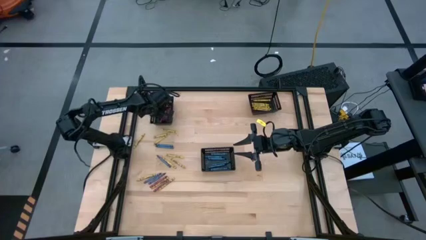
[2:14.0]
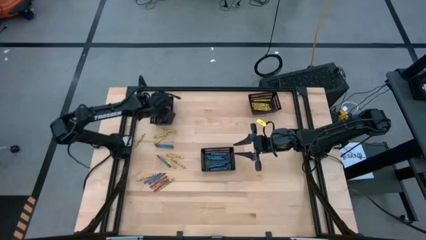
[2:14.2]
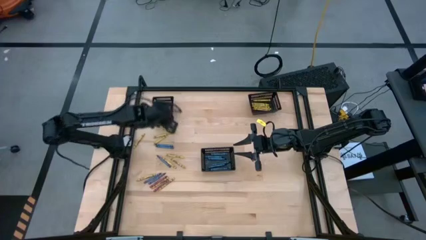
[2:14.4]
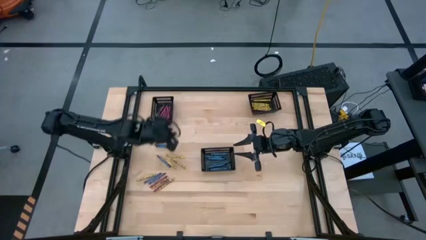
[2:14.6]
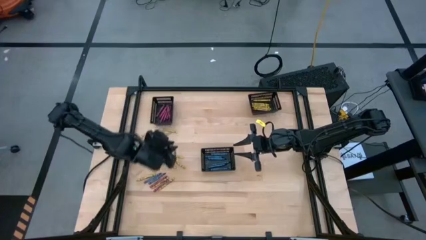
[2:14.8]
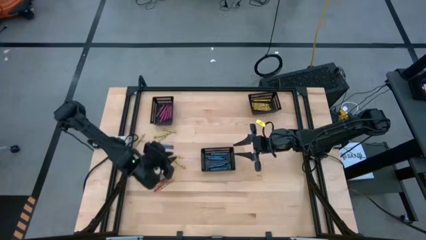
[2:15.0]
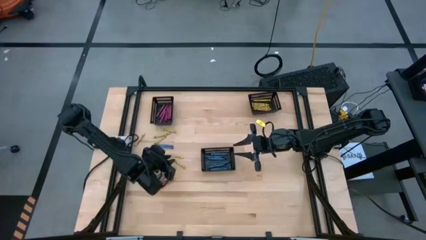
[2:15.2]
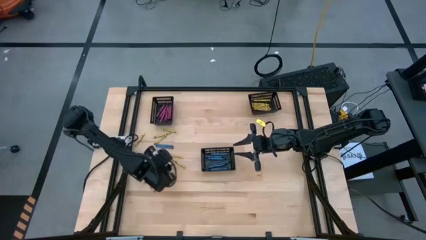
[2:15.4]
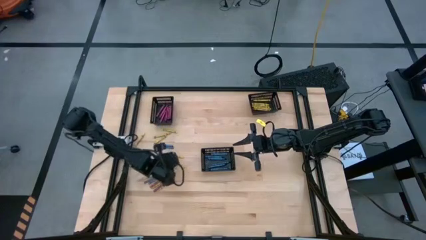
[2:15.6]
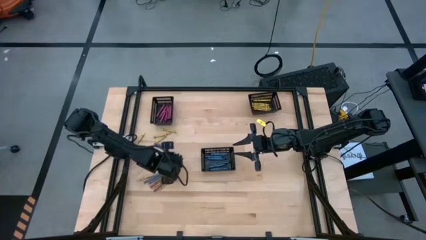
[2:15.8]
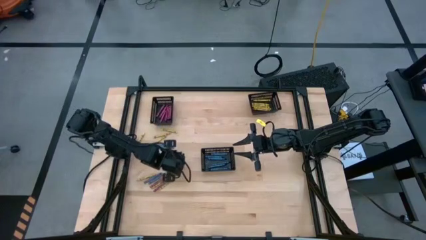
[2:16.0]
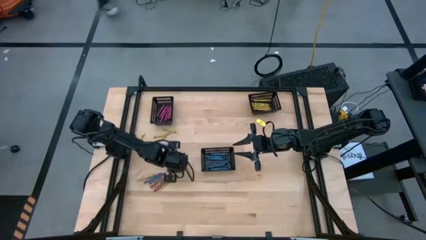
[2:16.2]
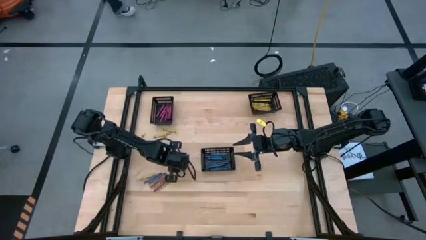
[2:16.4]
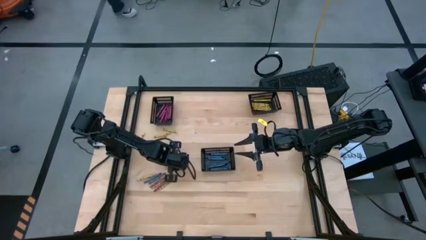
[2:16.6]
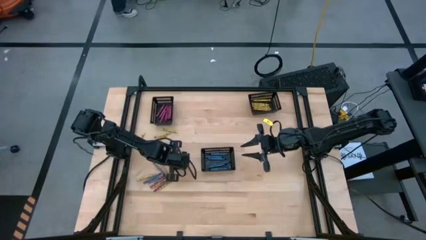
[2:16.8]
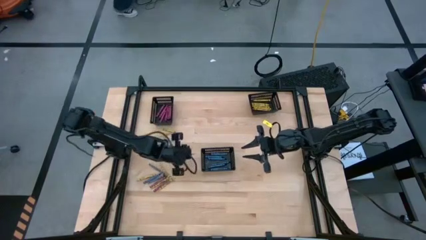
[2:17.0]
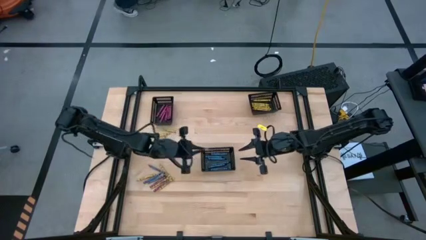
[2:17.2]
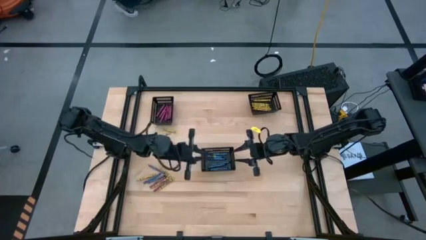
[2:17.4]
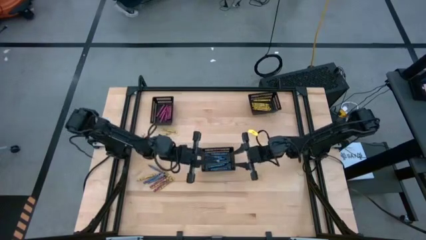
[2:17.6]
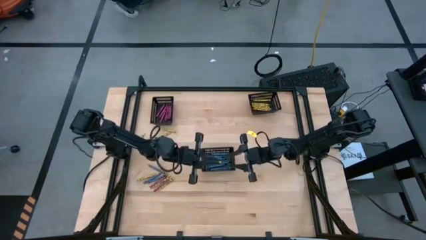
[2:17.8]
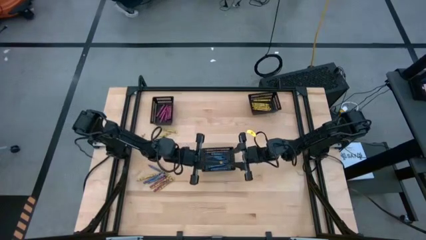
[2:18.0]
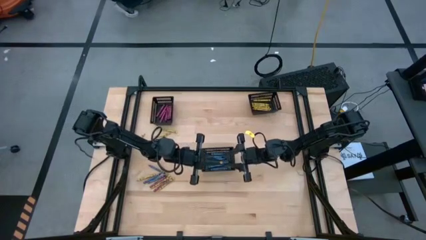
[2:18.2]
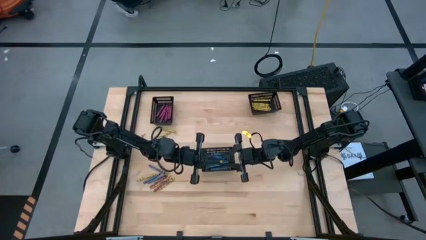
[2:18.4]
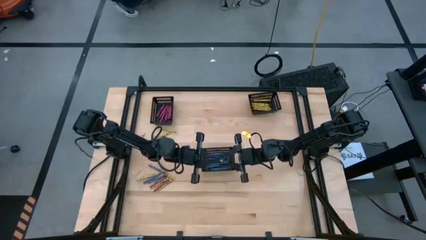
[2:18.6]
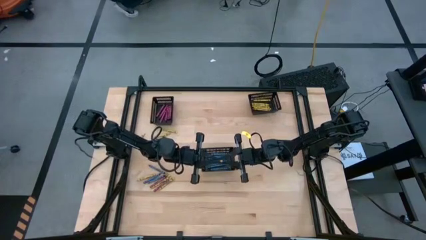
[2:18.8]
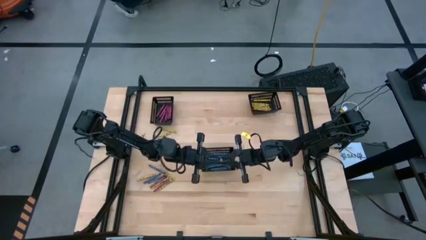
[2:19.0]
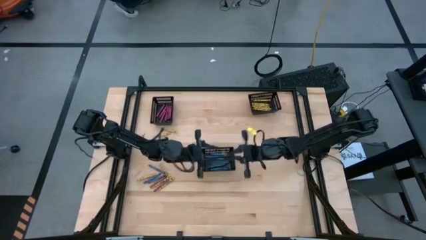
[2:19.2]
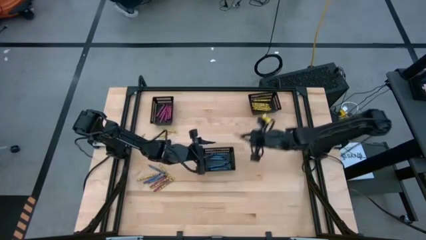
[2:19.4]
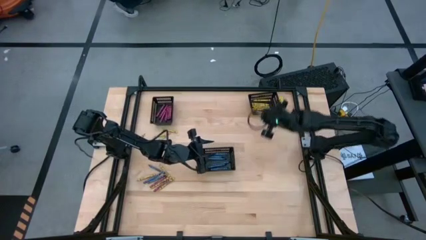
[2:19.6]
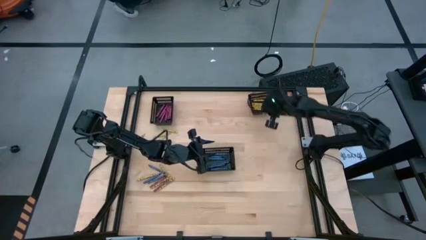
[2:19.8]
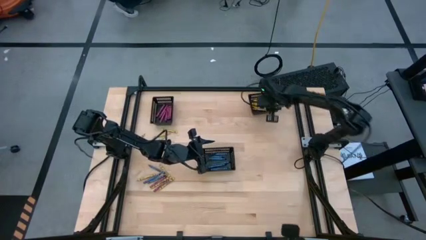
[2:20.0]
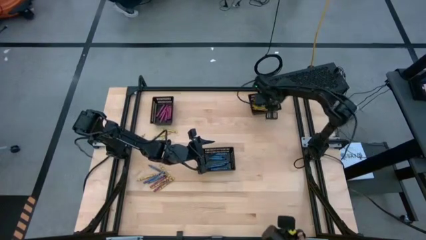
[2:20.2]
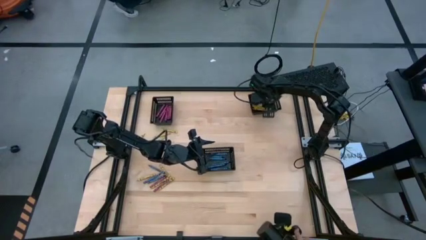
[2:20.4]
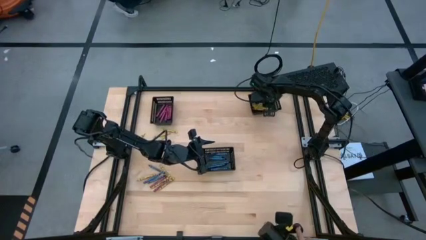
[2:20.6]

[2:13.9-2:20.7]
Task: Sort crayons
Put the yellow crayon into the top right black bin

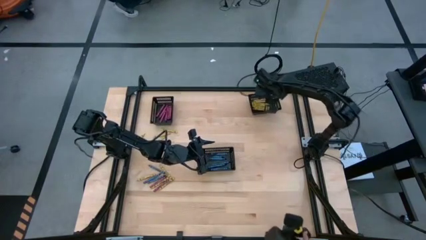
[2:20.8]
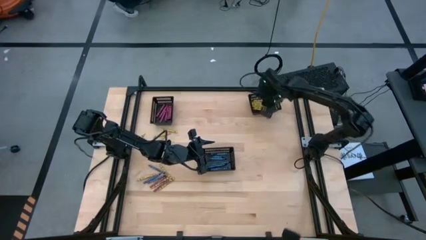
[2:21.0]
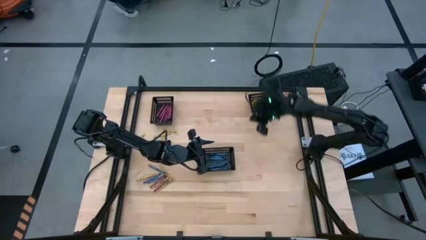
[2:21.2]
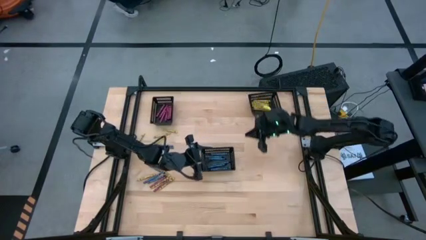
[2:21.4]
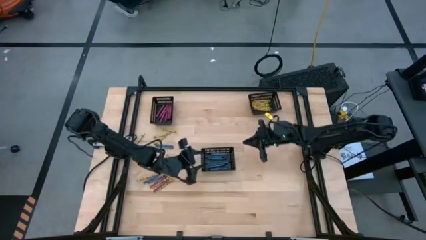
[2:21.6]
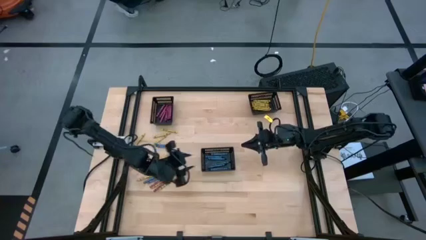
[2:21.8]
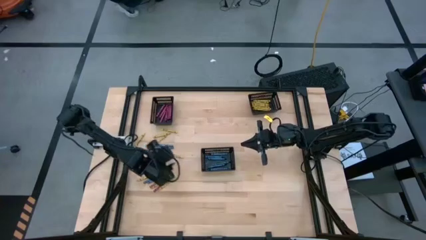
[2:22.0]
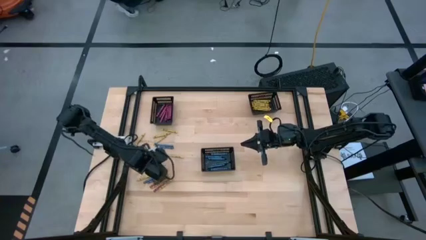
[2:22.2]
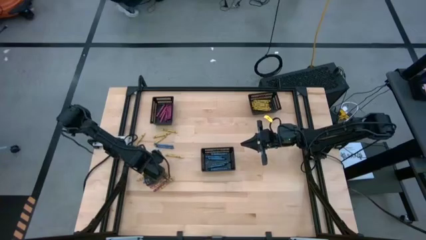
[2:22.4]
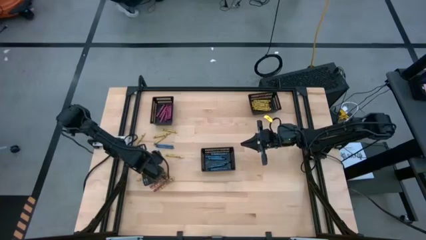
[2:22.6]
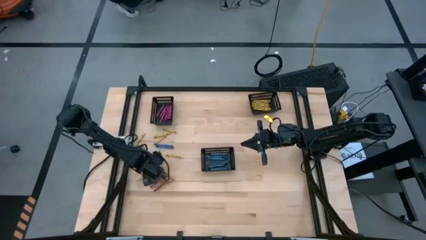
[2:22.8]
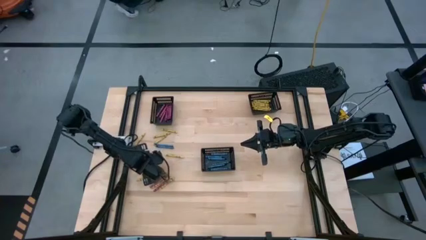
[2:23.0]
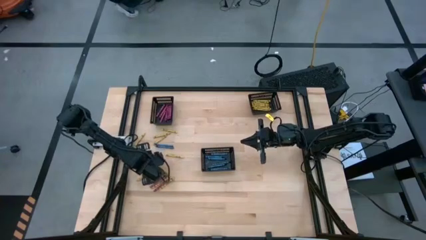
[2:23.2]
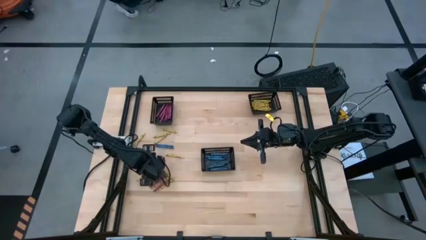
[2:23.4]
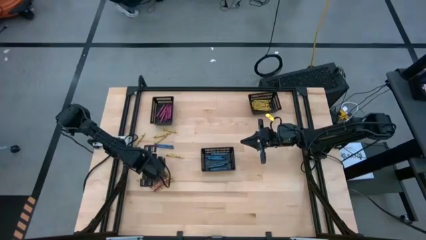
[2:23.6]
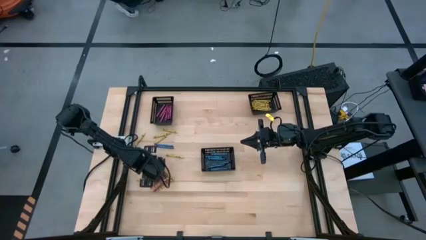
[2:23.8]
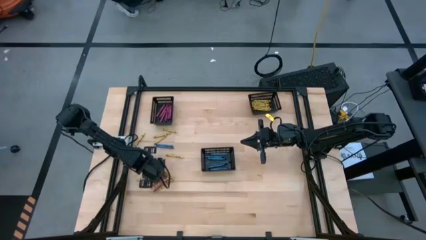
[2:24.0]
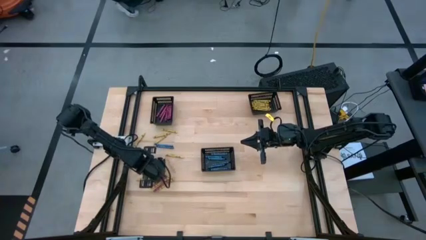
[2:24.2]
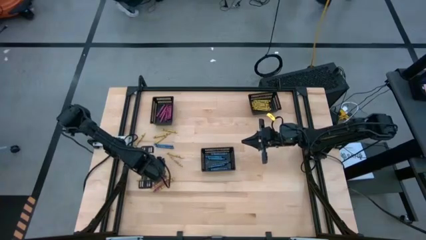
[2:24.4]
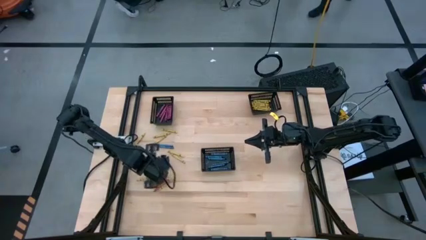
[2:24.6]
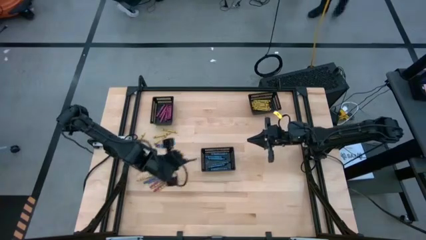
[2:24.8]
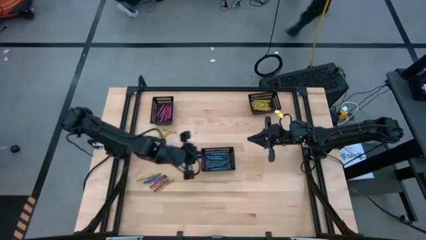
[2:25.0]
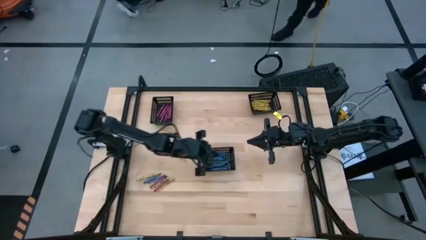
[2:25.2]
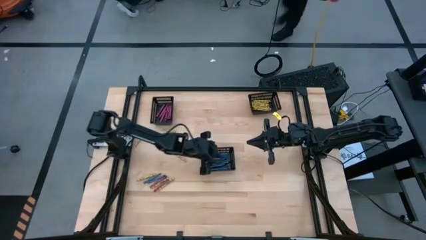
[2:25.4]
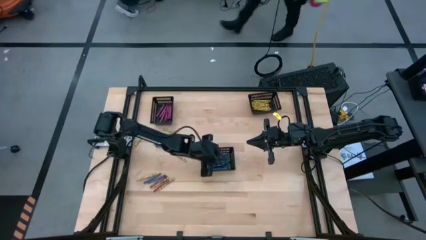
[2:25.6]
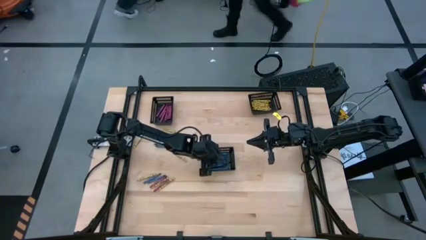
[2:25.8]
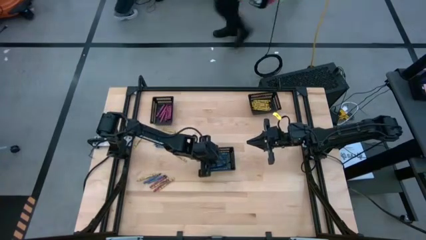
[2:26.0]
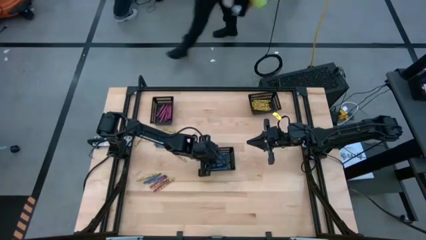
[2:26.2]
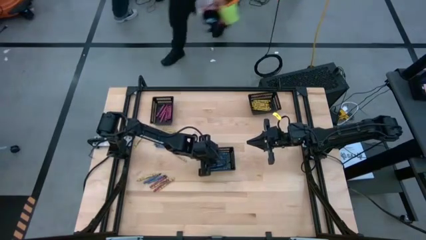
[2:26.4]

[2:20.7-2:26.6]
Put the blue crayon into the bottom black bin

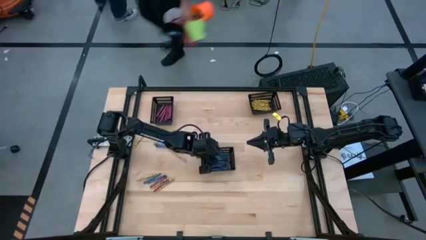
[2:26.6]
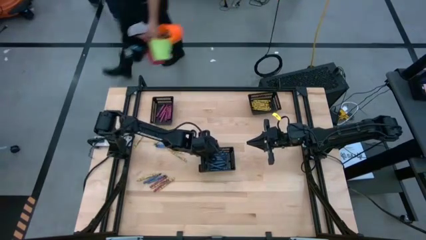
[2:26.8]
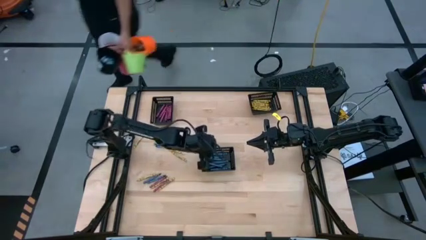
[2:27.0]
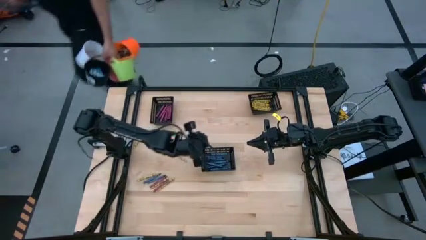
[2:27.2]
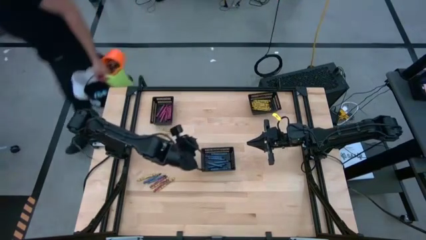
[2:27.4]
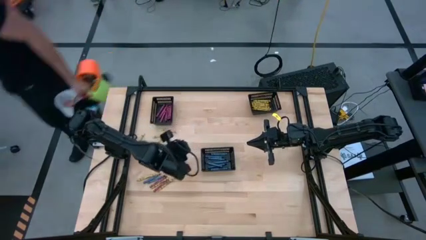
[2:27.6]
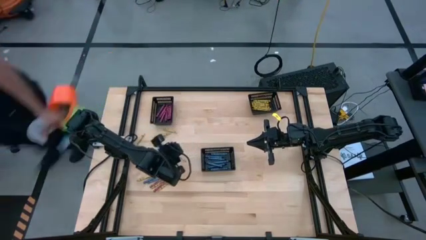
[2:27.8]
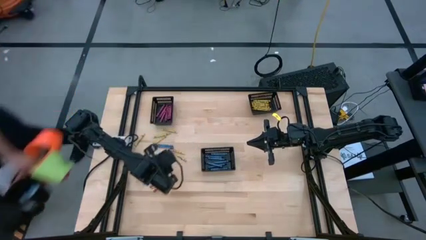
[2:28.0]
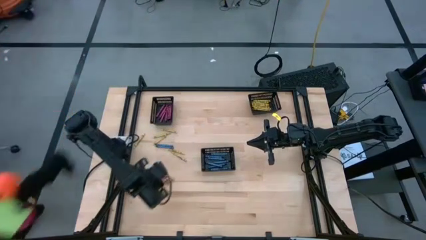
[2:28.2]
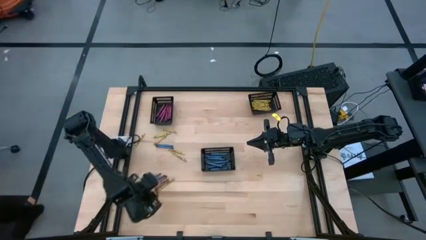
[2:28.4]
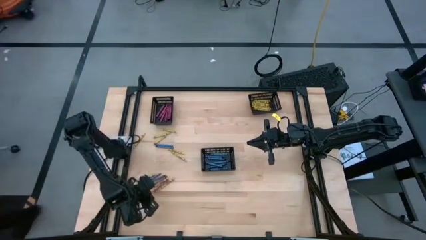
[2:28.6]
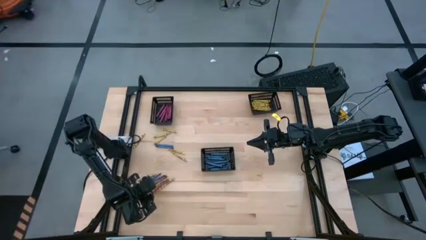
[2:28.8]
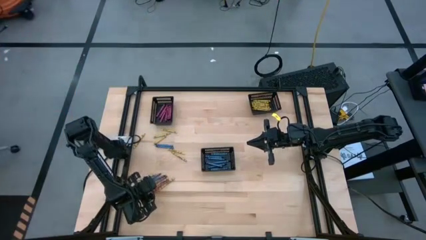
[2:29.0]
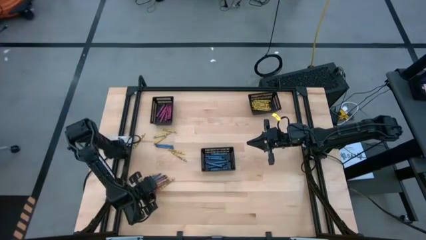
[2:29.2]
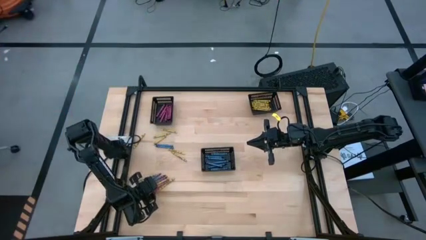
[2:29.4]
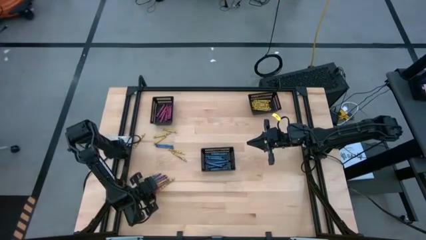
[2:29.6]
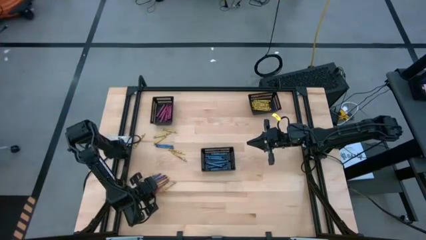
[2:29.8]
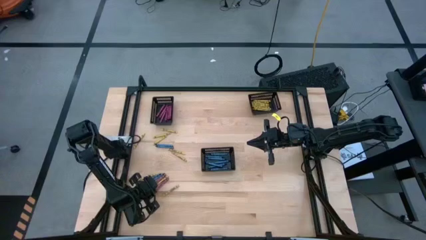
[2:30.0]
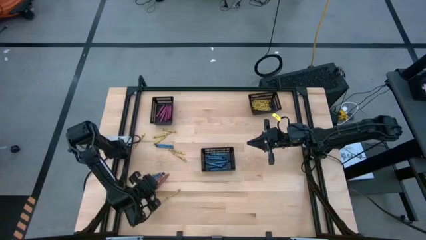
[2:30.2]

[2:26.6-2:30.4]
Put the pink crayon into the top left black bin
